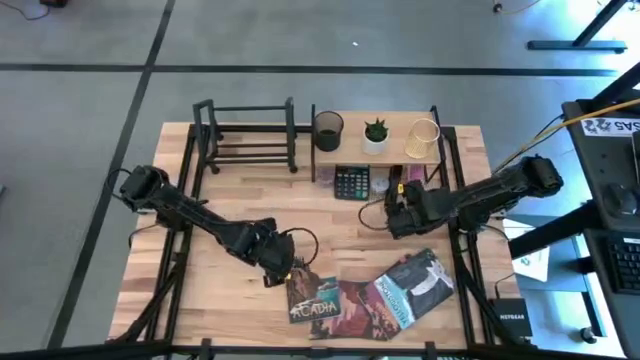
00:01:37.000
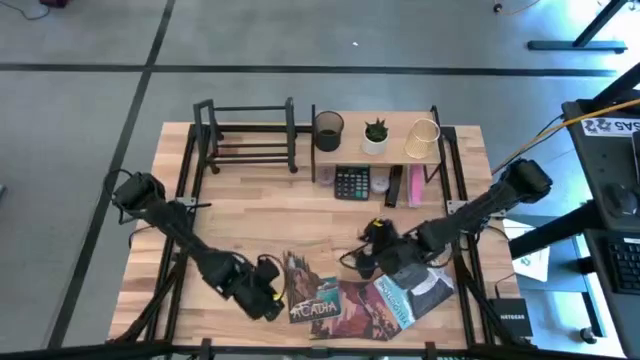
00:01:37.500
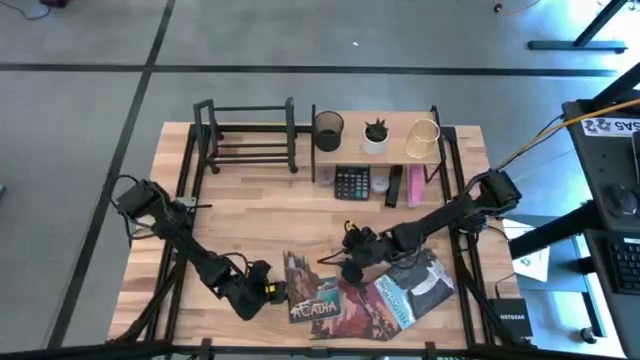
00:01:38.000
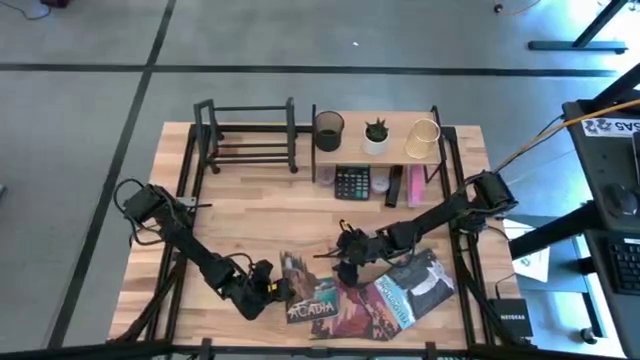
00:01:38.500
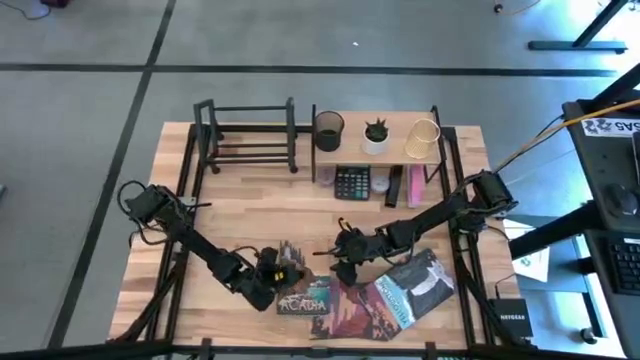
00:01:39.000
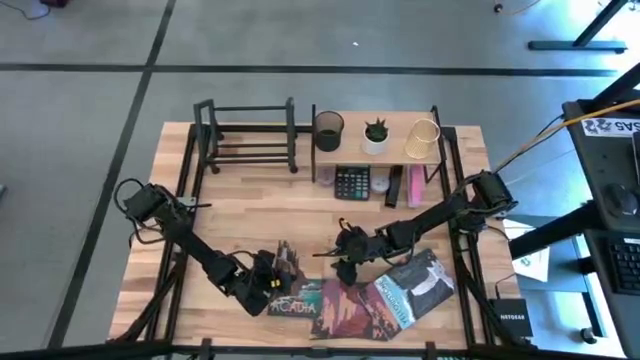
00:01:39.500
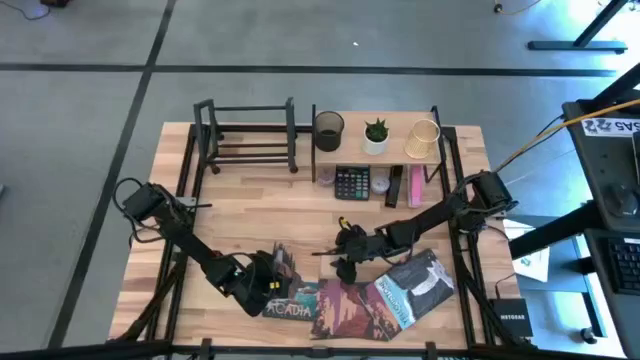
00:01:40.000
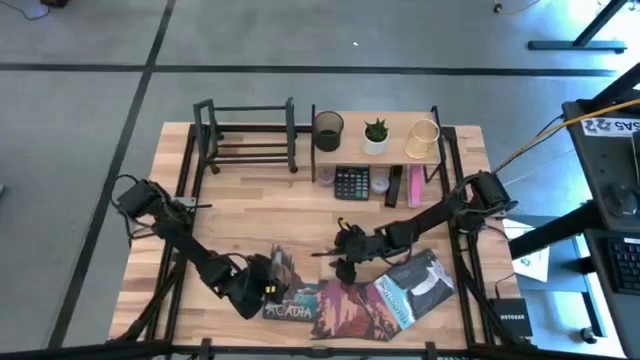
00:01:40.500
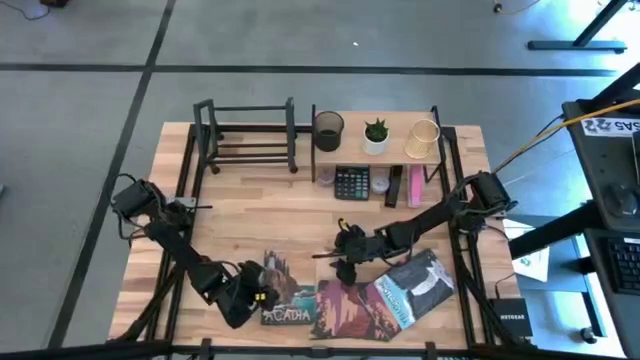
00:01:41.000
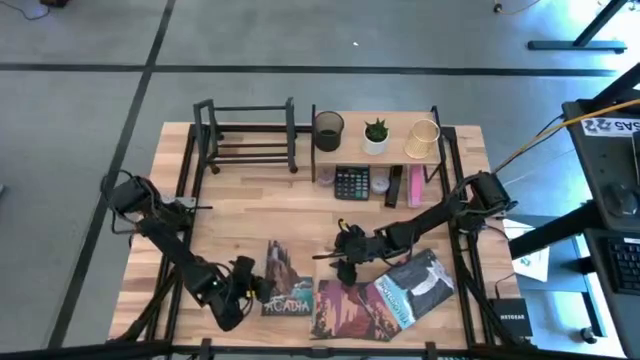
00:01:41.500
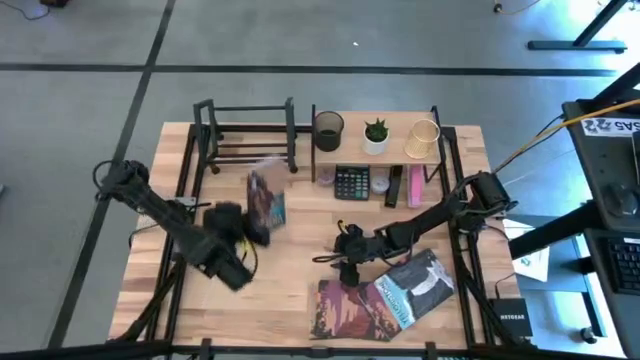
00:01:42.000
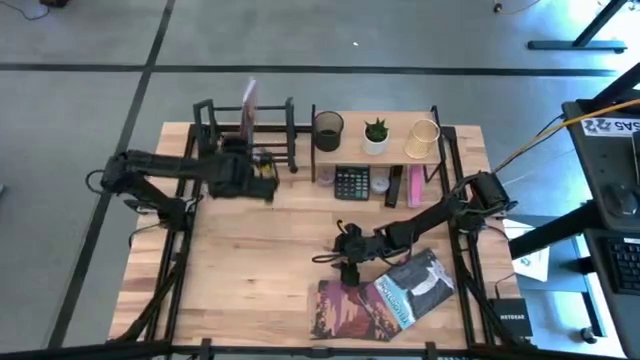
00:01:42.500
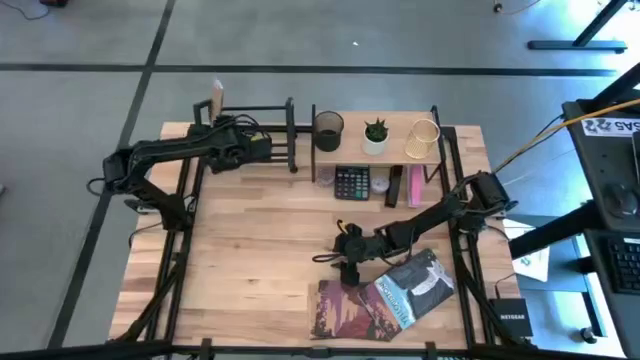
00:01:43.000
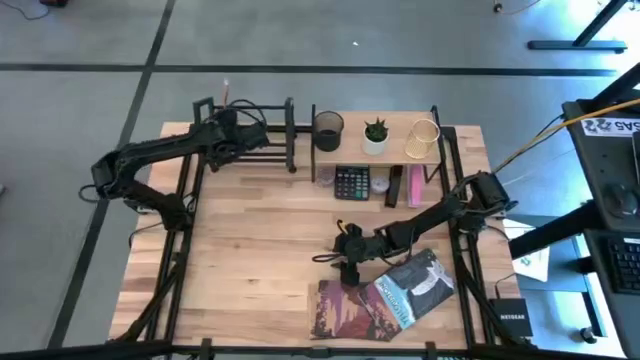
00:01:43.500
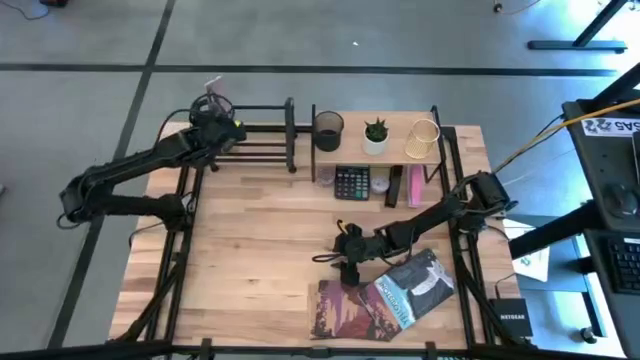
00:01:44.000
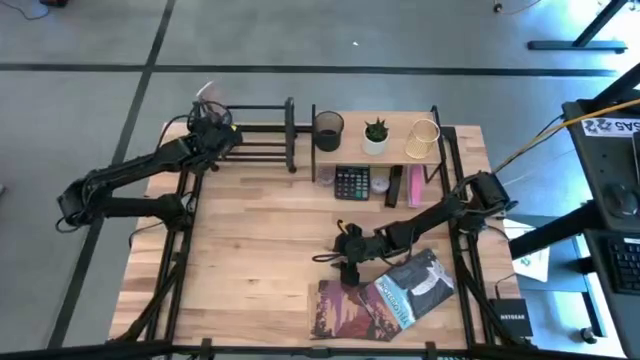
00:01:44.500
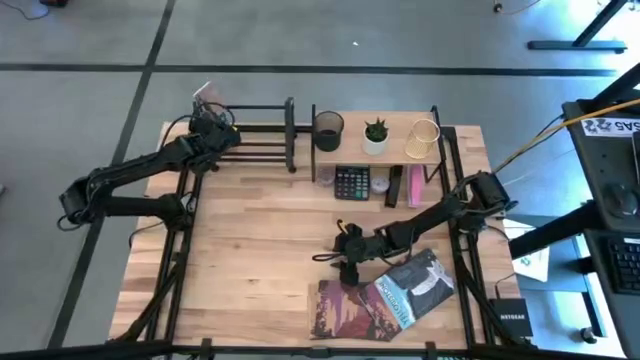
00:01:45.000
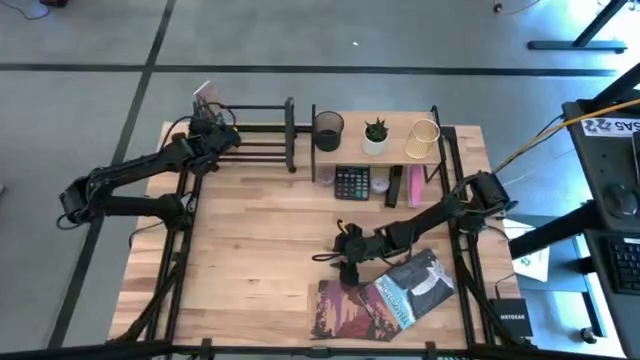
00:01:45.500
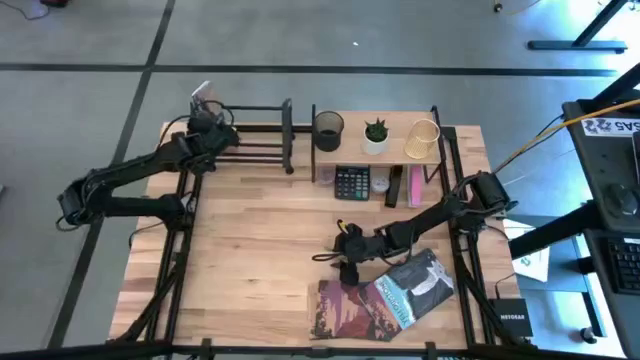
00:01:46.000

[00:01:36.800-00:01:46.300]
Task: Stock shelves
Put the brown book on the book shelf

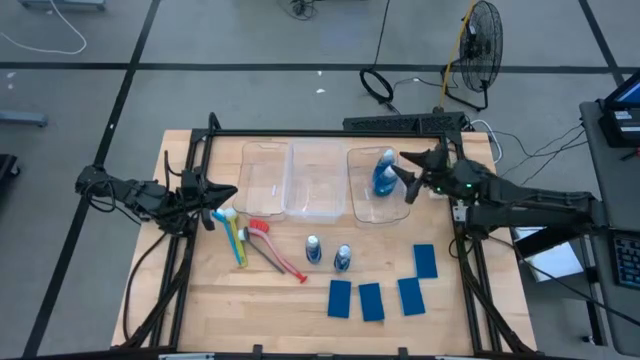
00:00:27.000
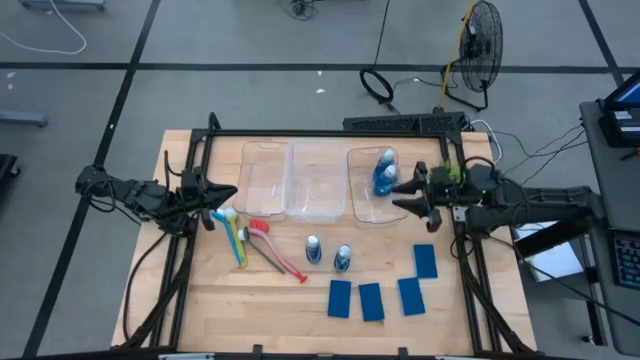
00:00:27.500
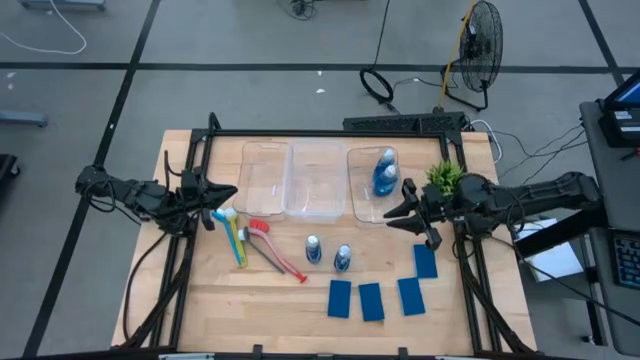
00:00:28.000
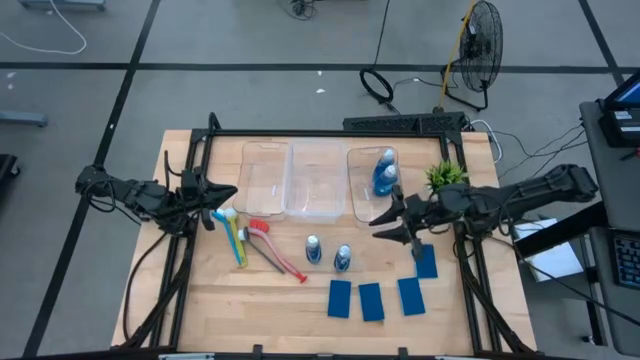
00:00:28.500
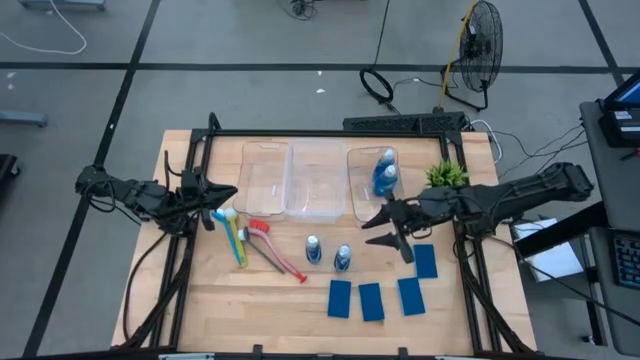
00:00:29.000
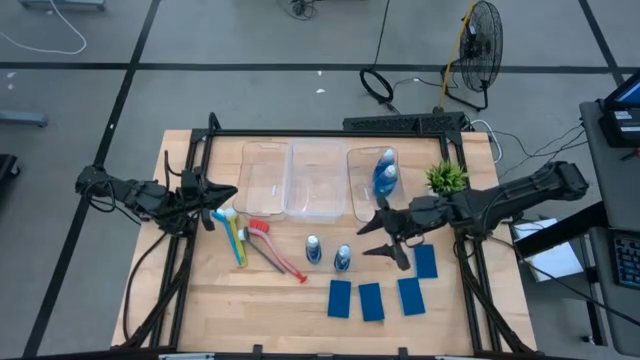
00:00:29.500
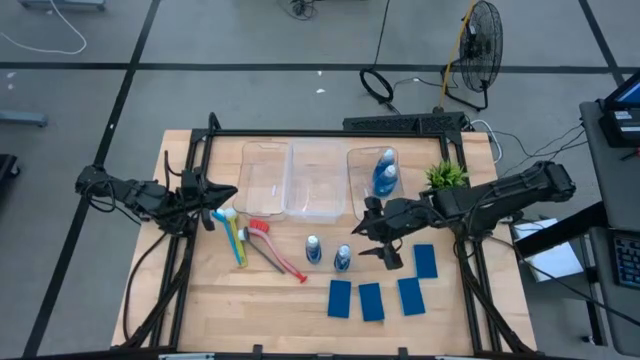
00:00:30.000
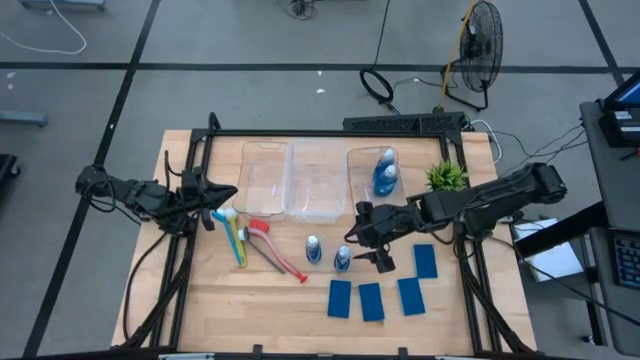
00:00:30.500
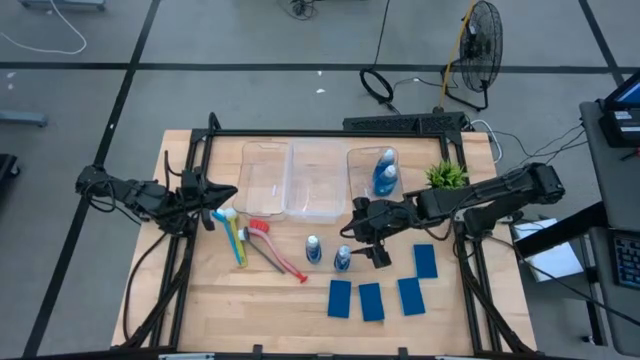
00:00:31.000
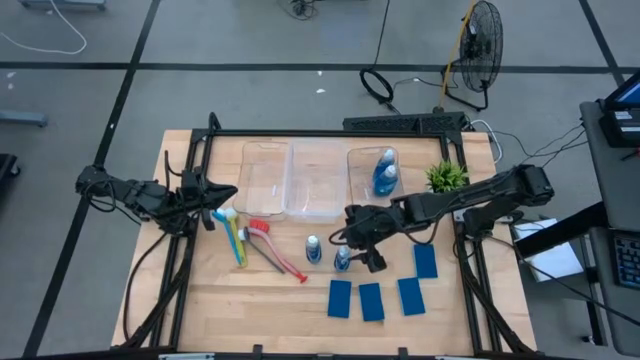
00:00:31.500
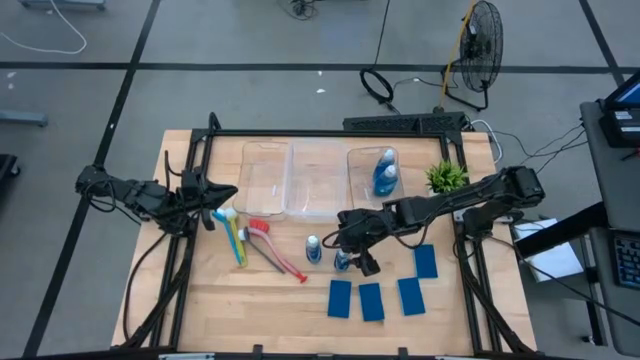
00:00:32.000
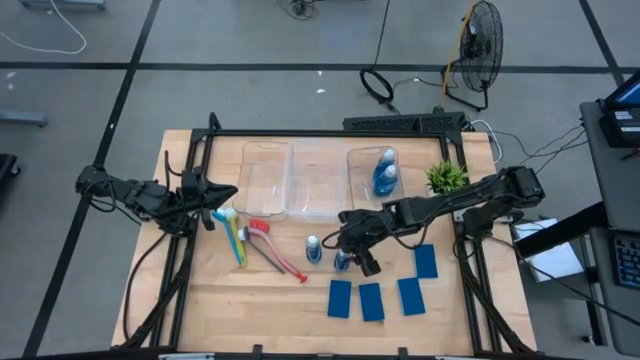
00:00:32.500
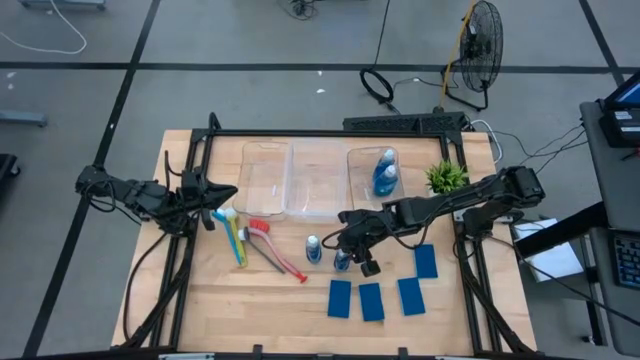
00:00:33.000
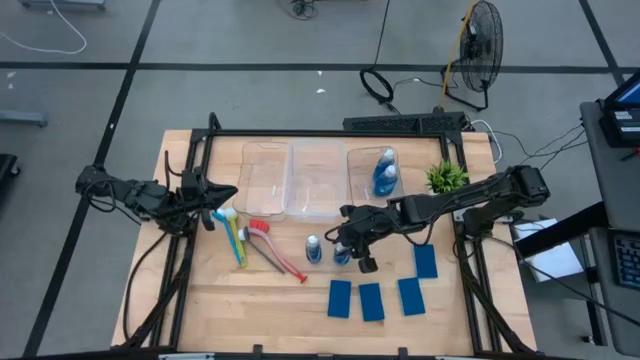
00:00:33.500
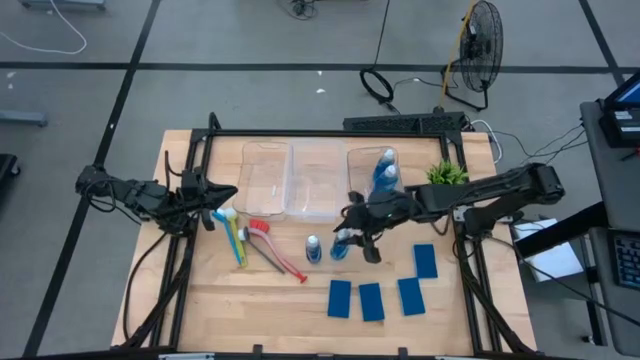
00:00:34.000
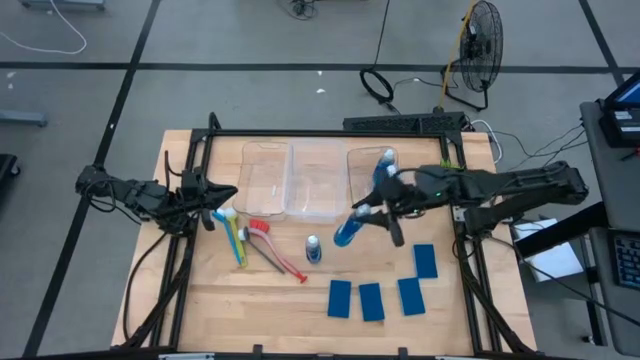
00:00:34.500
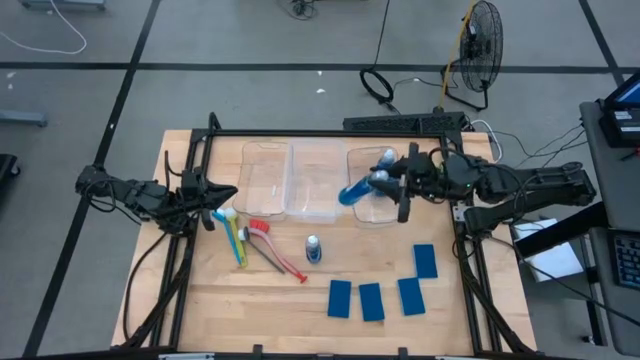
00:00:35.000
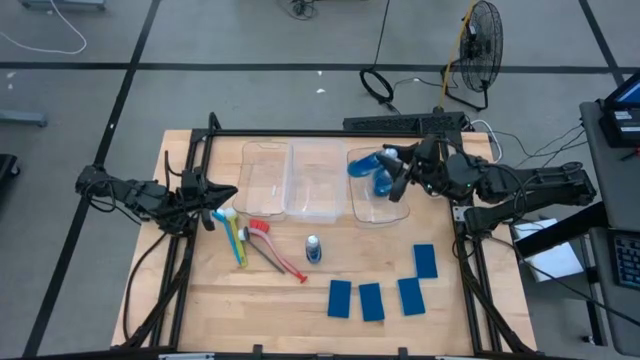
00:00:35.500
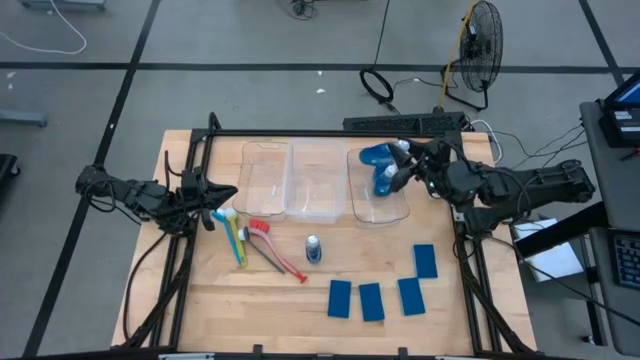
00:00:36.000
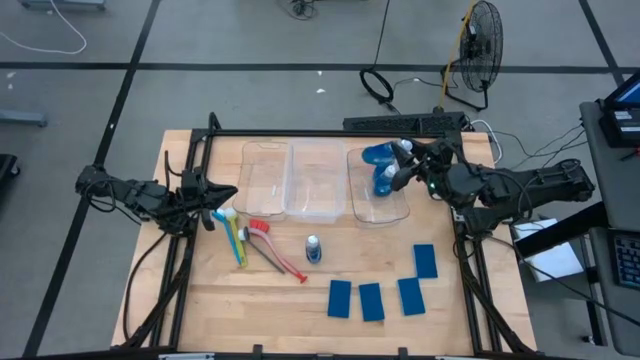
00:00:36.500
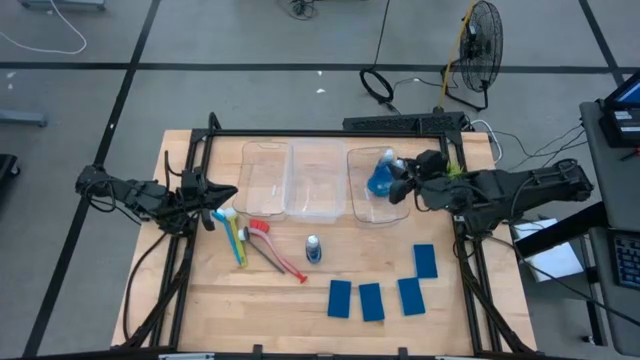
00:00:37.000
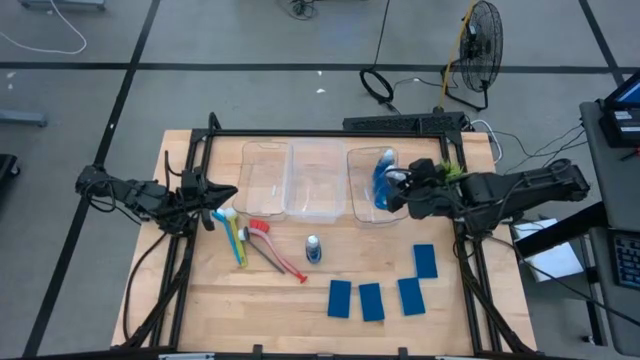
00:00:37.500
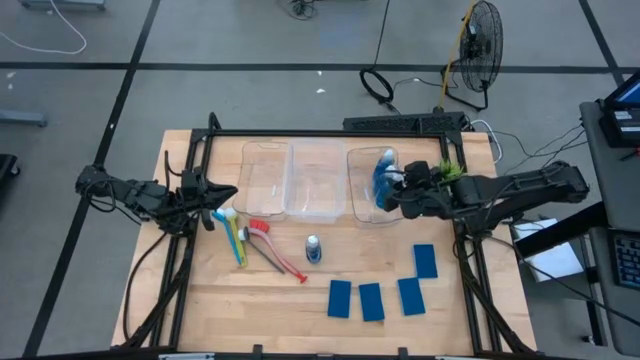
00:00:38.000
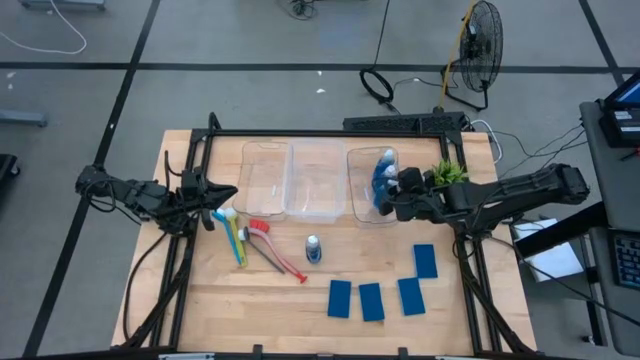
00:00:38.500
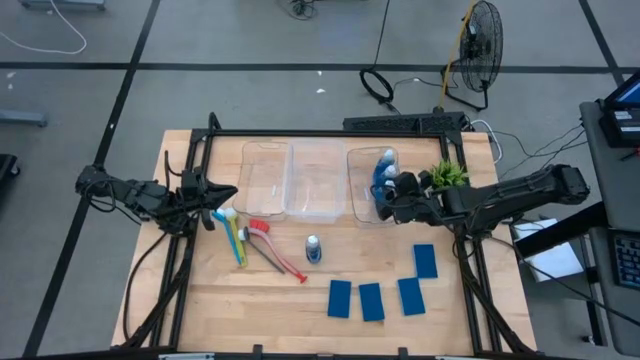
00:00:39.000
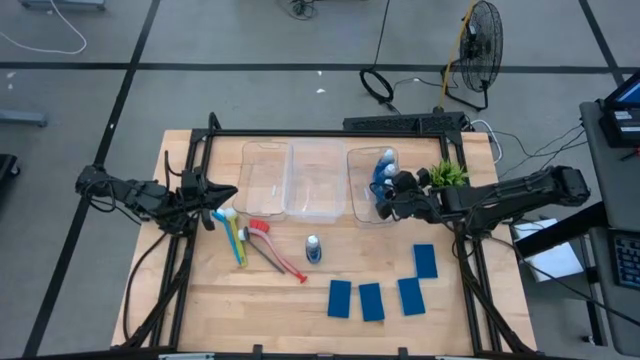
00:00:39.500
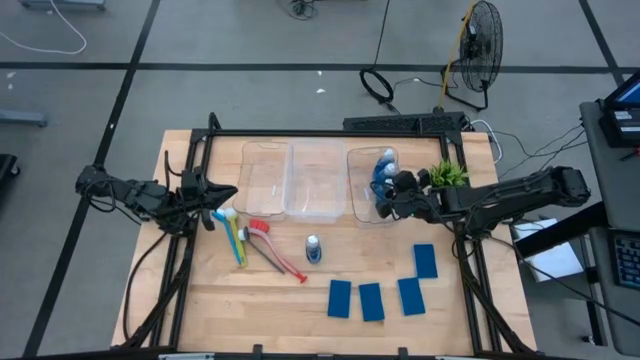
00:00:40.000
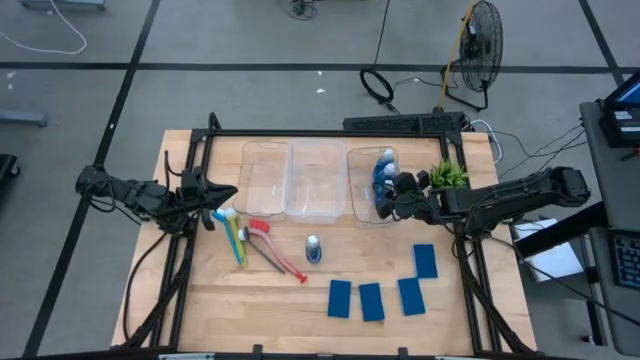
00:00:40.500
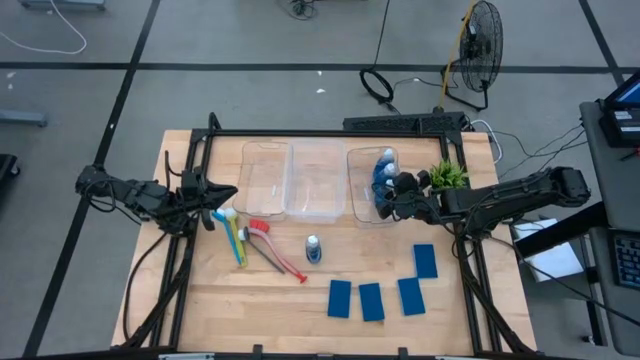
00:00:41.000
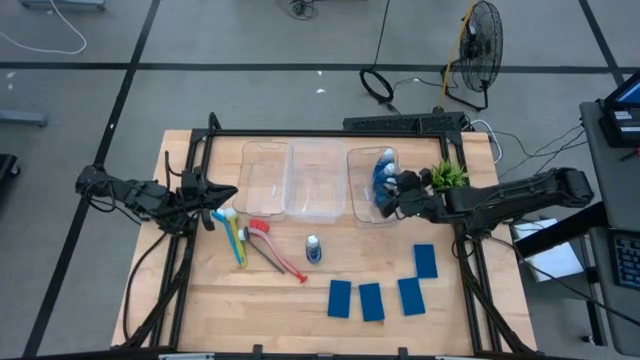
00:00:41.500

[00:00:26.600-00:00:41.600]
Task: Pick & Place Kitchen Sink Supplies
Put the blue dishwashing liquid bottle into the right transparent bin
